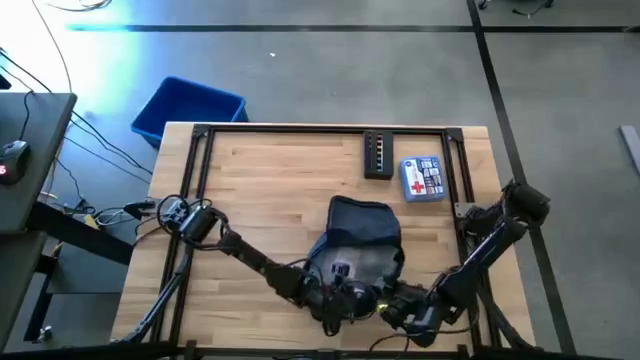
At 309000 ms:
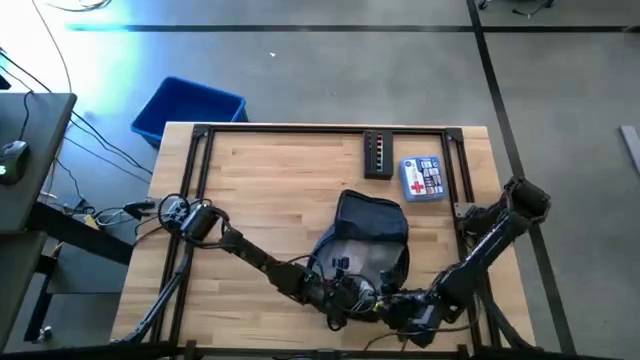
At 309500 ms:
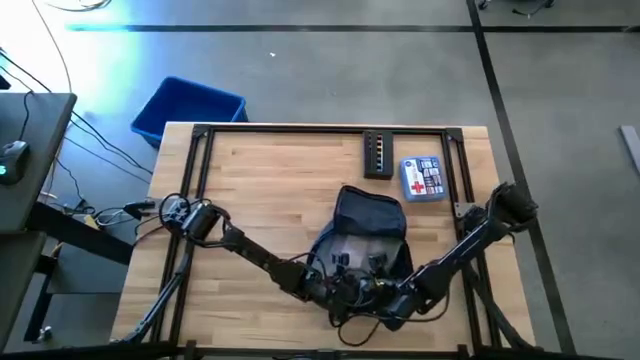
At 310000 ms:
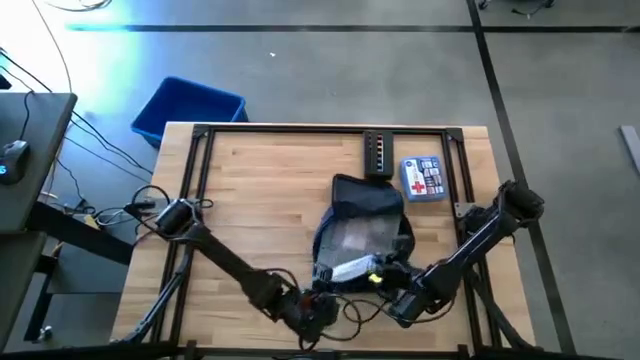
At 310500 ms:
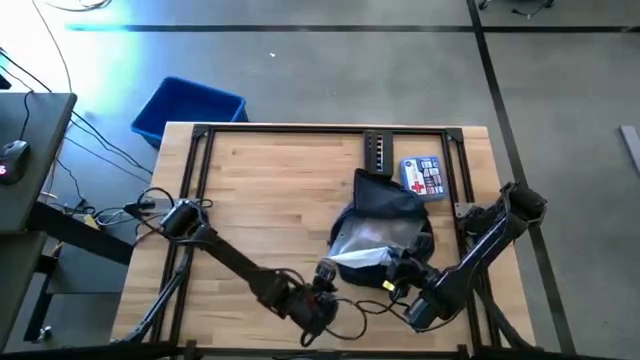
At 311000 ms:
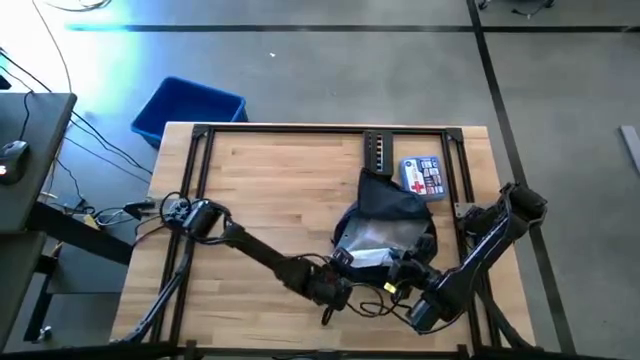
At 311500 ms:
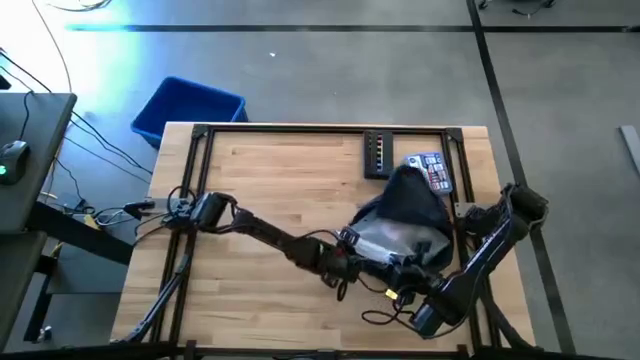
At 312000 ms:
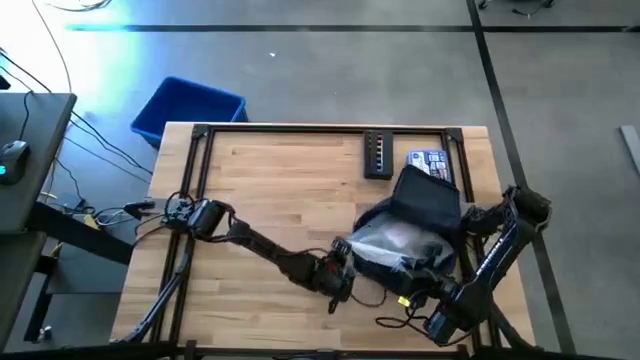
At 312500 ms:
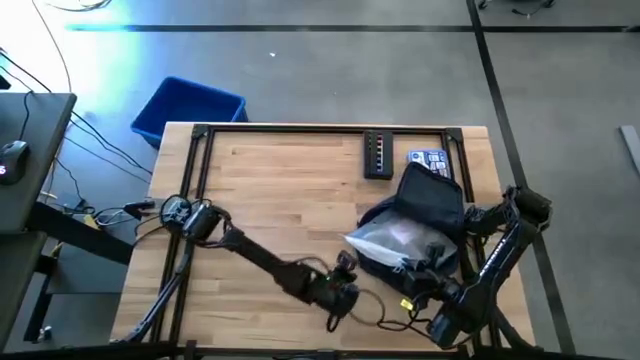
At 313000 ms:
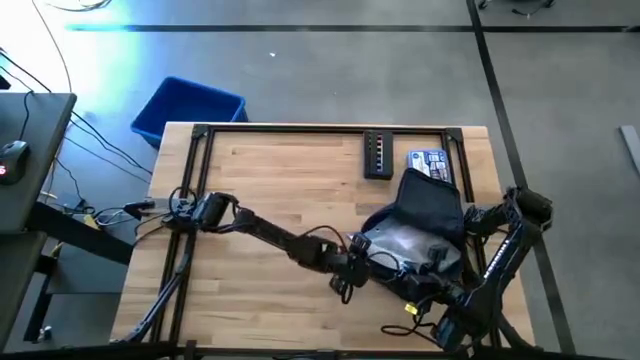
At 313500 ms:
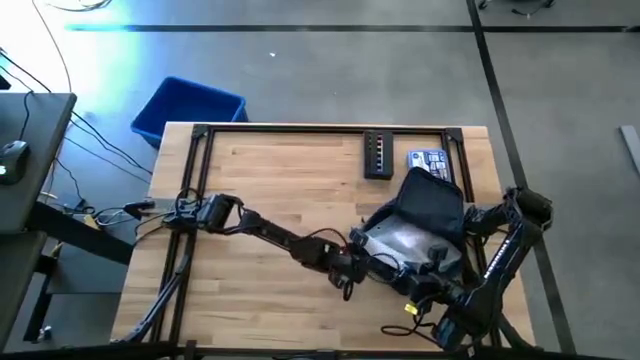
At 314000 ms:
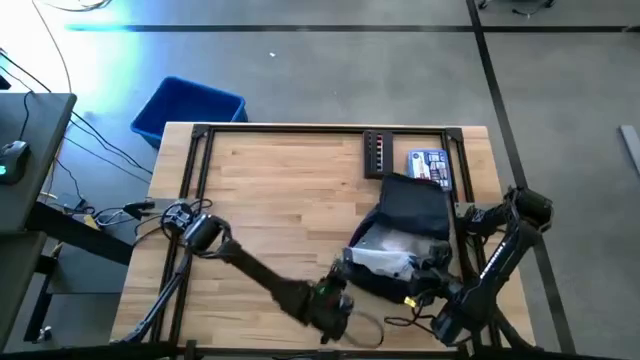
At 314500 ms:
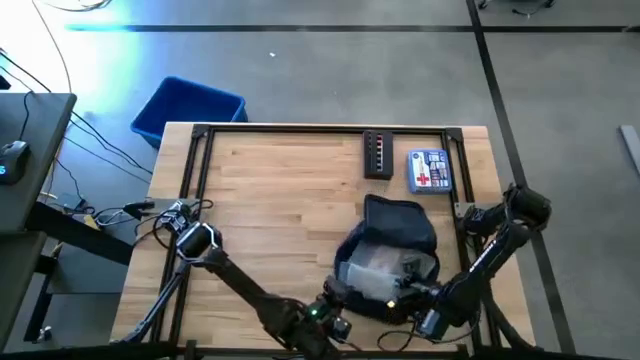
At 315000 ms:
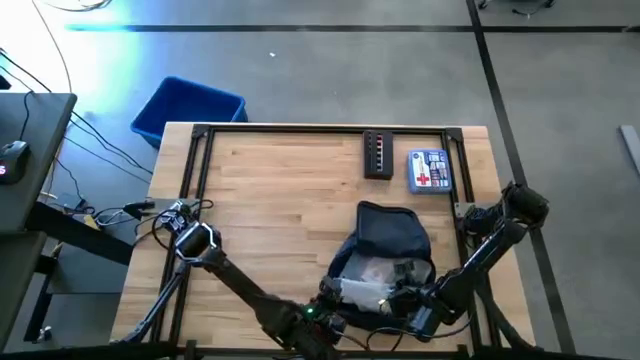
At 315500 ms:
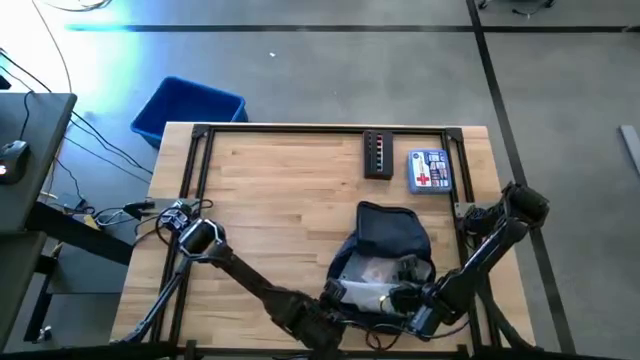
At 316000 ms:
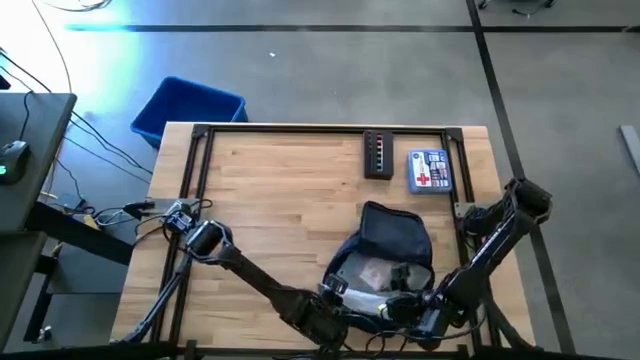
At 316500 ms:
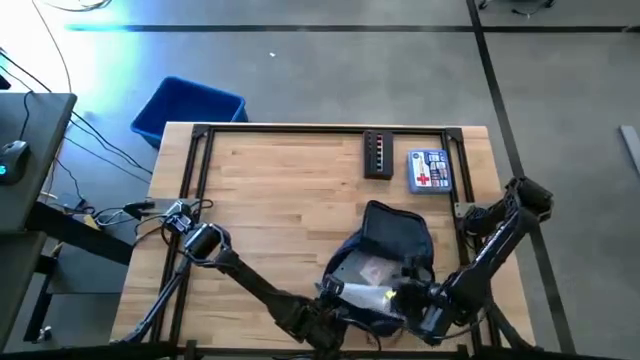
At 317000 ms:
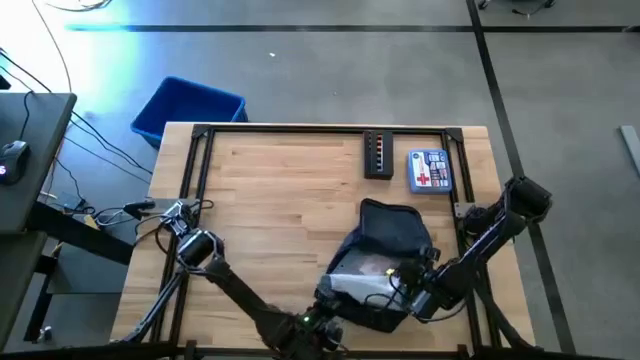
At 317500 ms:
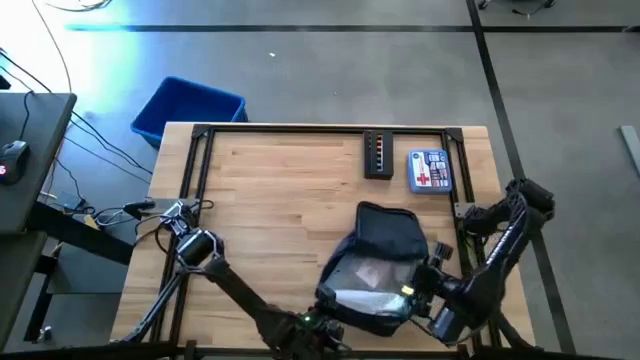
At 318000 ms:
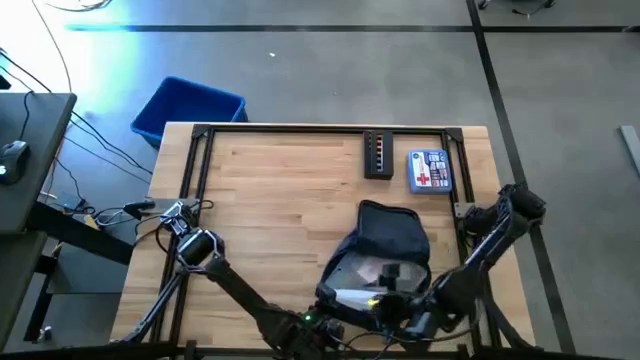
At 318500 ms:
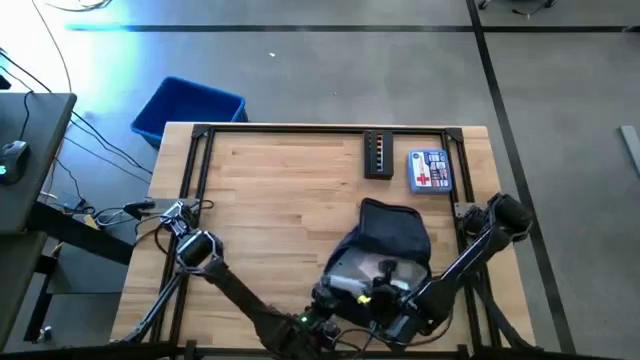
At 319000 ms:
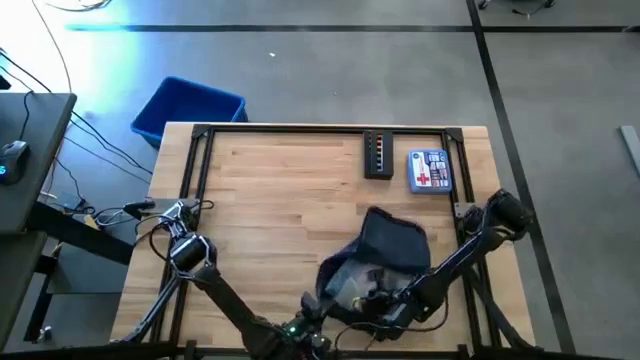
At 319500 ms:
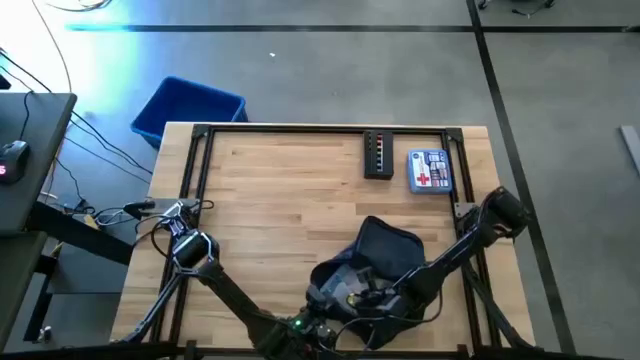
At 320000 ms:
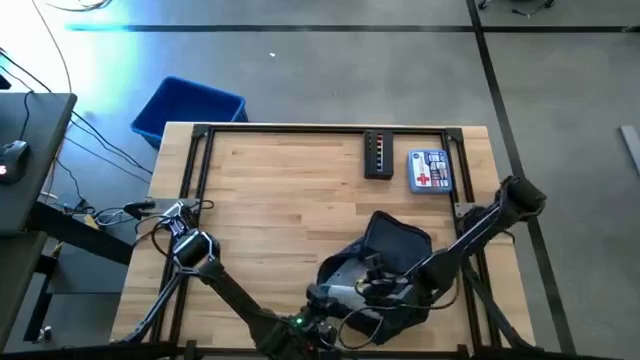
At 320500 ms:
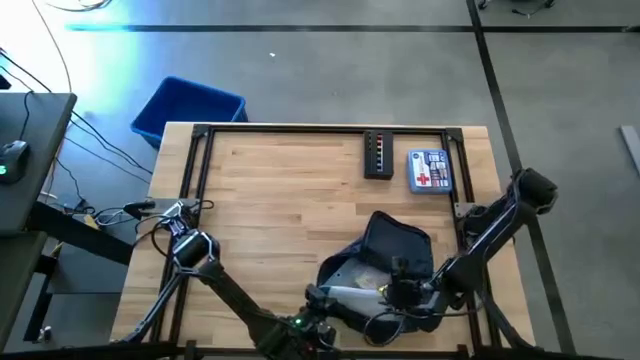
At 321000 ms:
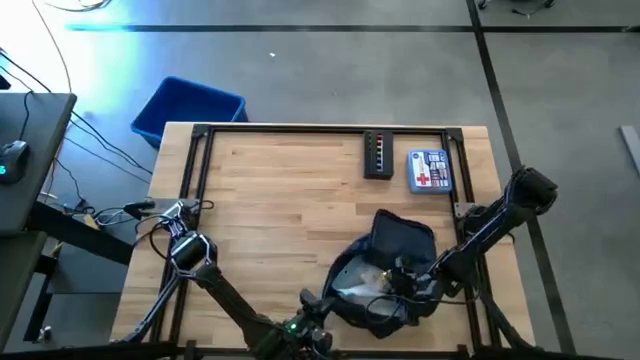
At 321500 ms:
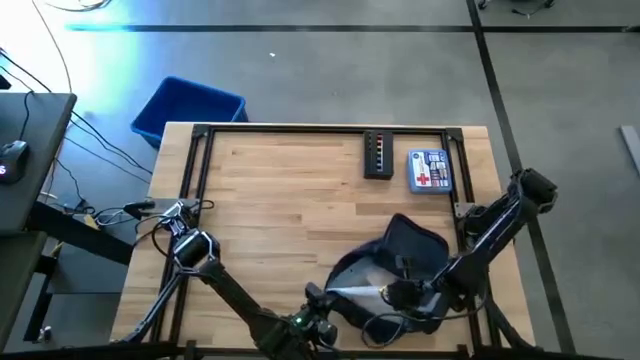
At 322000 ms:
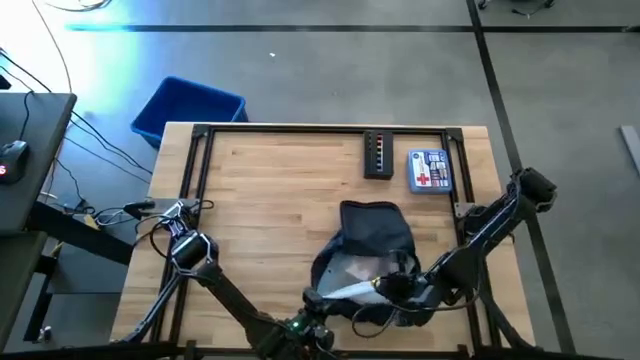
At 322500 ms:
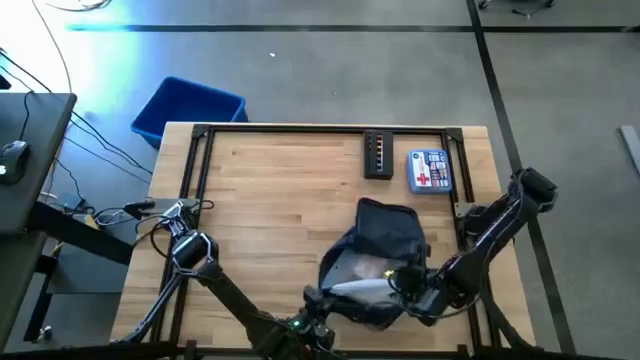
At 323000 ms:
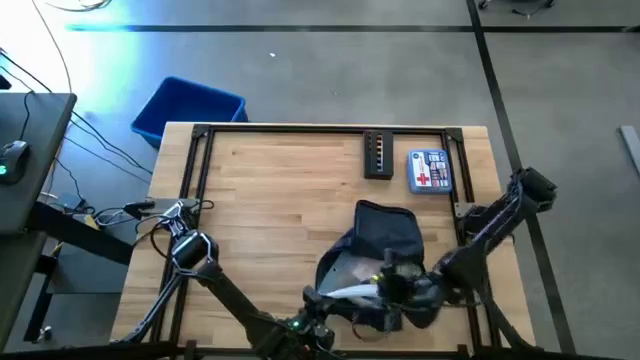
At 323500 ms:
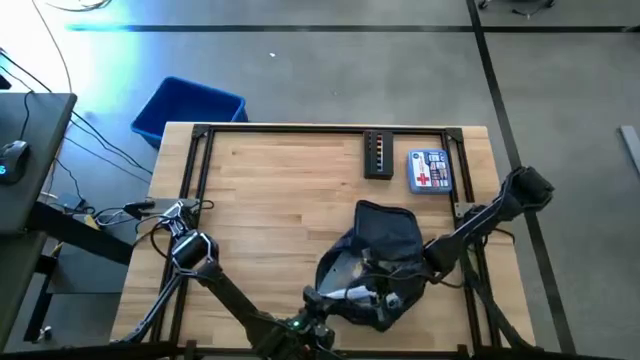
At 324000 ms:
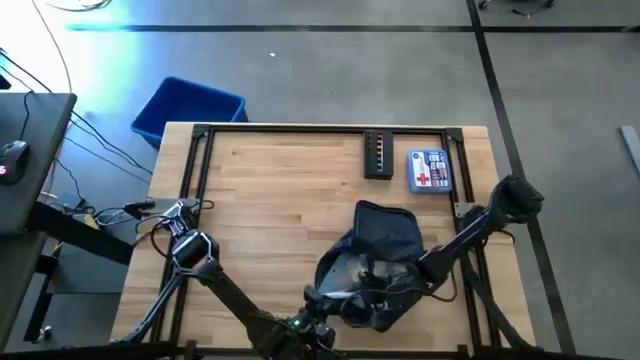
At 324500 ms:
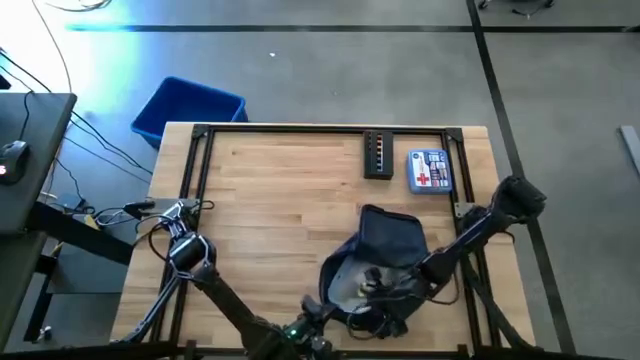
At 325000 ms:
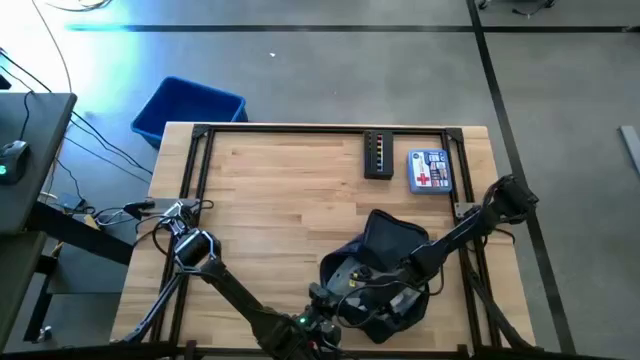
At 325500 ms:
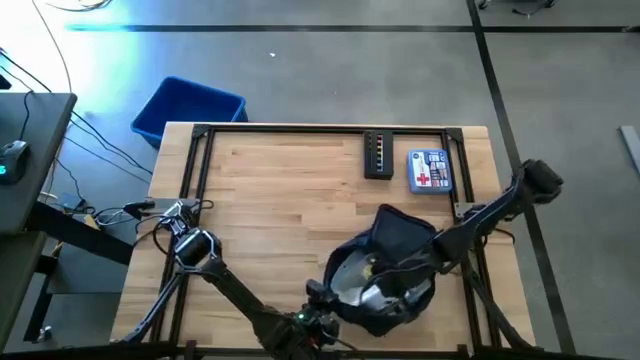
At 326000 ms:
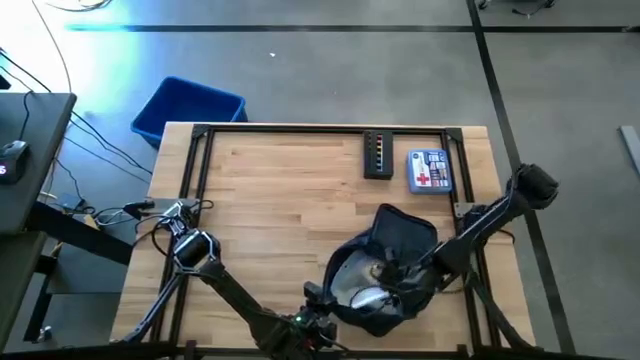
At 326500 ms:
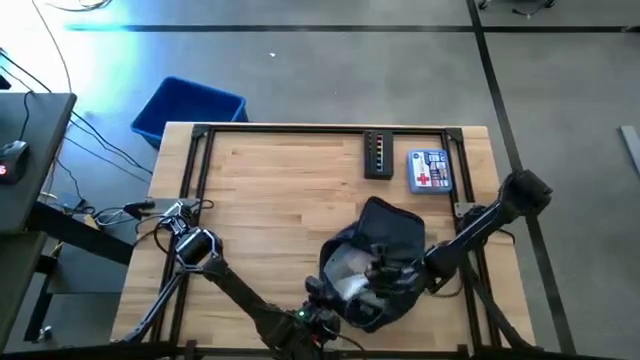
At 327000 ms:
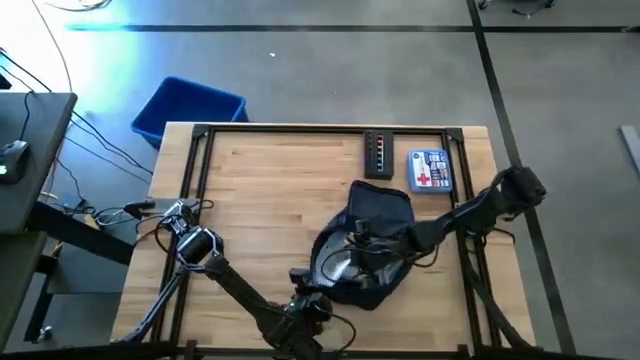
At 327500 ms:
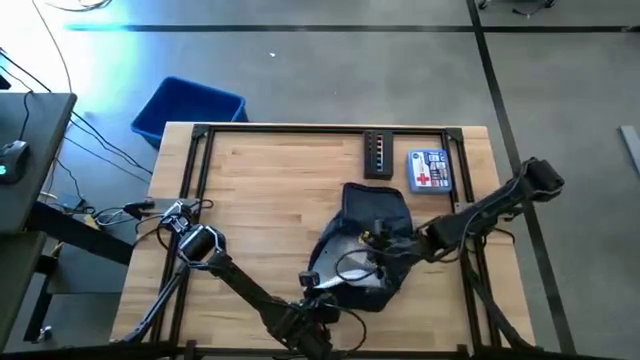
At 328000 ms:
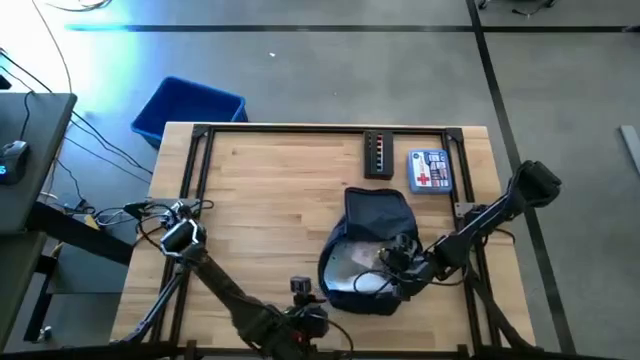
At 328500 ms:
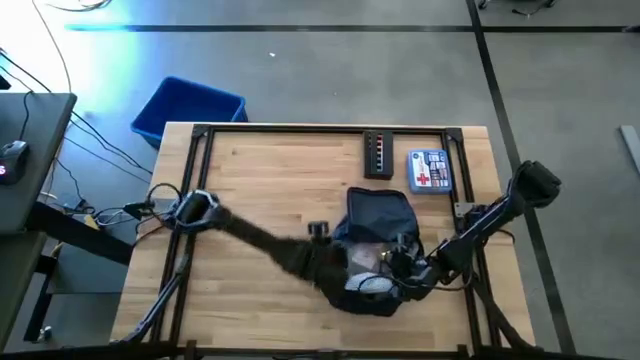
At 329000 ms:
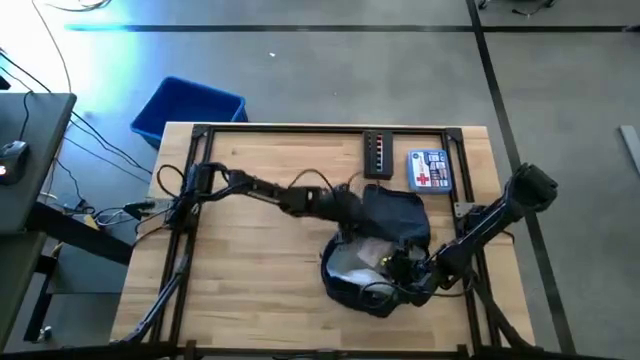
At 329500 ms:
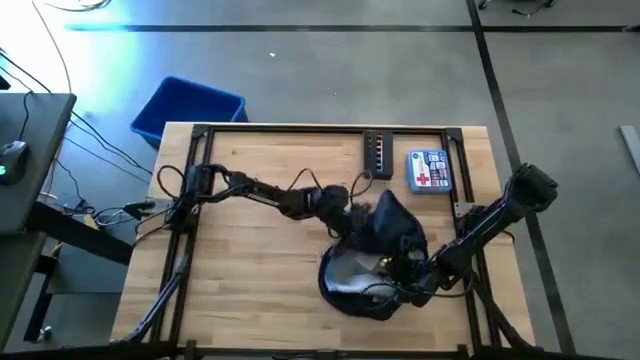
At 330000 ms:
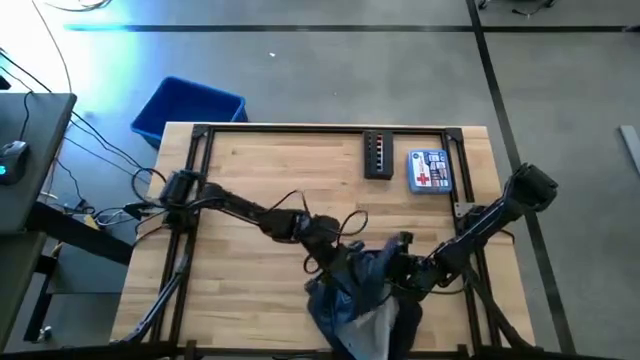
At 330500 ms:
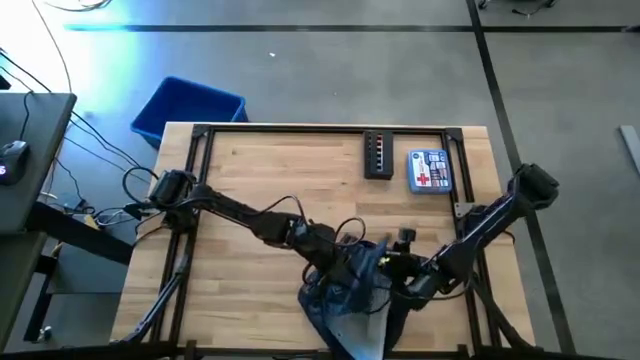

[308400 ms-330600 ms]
Task: Unpack backpack
Put the white zip bag into the backpack
